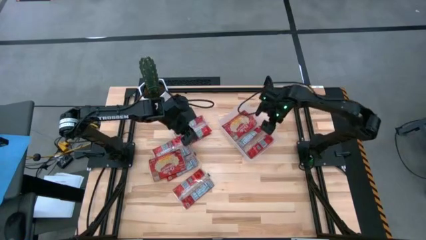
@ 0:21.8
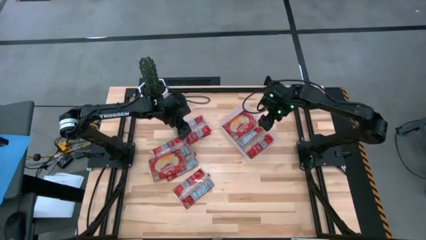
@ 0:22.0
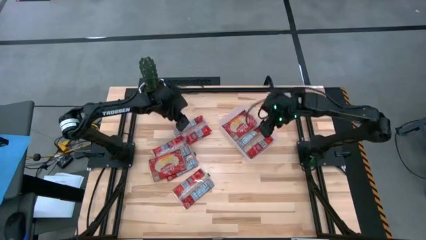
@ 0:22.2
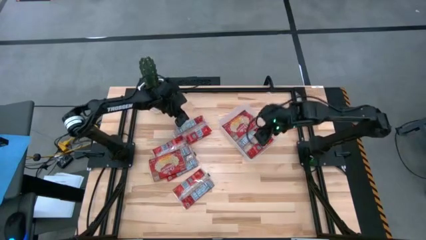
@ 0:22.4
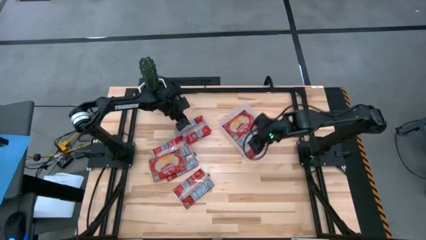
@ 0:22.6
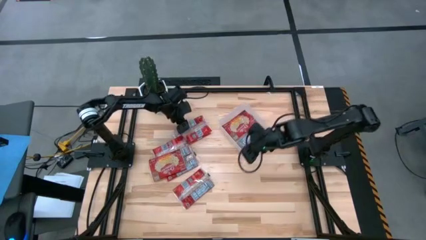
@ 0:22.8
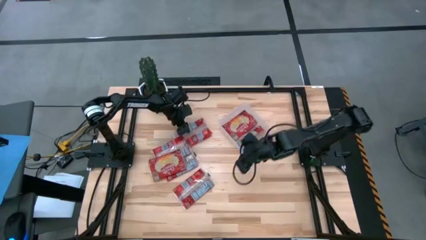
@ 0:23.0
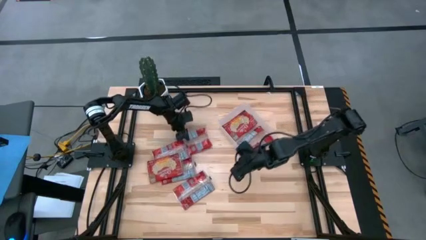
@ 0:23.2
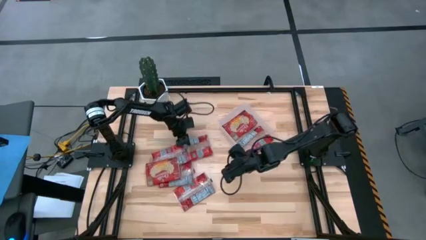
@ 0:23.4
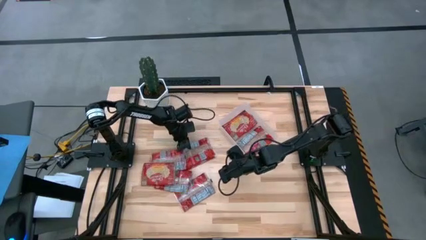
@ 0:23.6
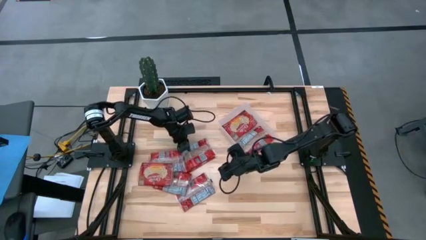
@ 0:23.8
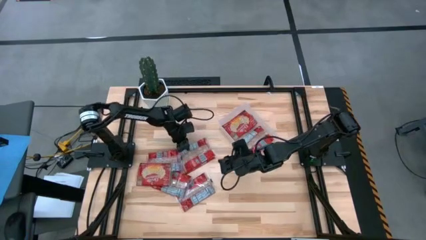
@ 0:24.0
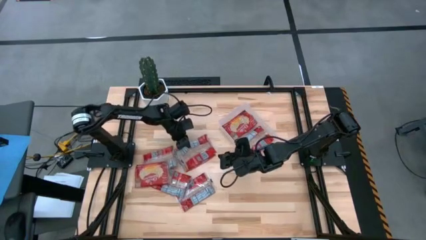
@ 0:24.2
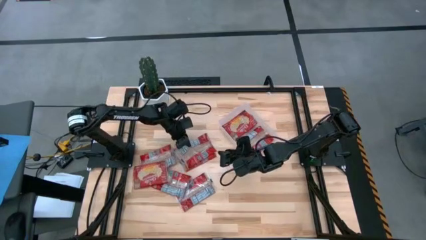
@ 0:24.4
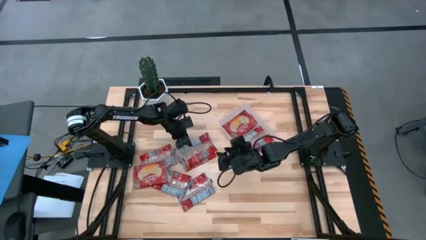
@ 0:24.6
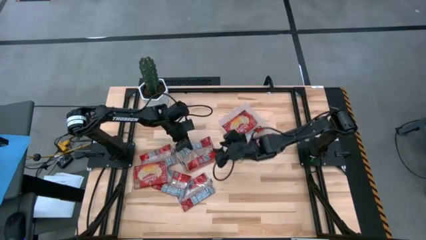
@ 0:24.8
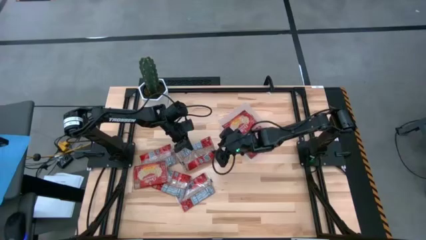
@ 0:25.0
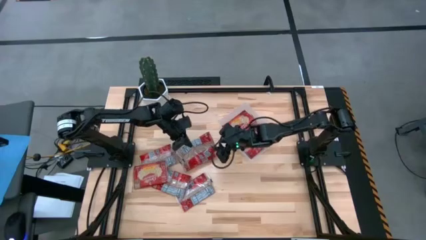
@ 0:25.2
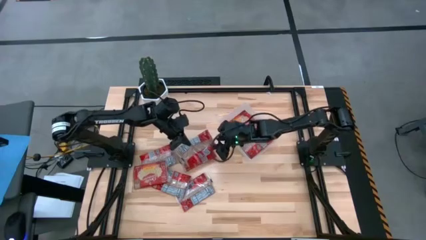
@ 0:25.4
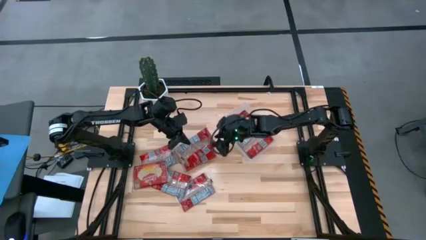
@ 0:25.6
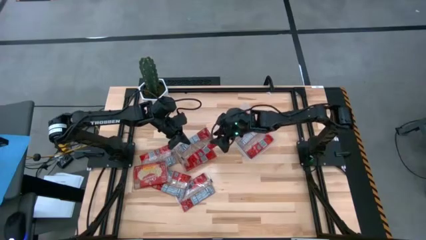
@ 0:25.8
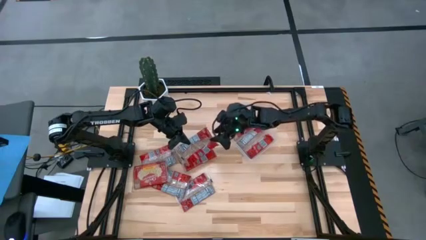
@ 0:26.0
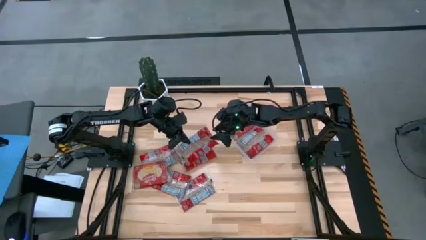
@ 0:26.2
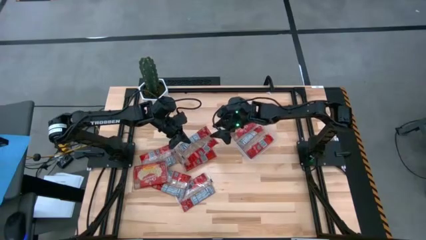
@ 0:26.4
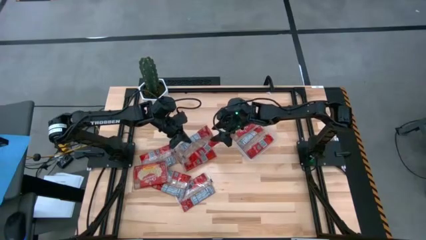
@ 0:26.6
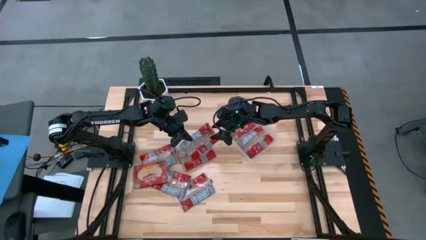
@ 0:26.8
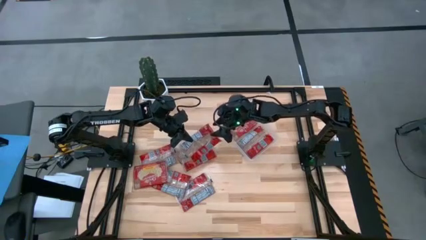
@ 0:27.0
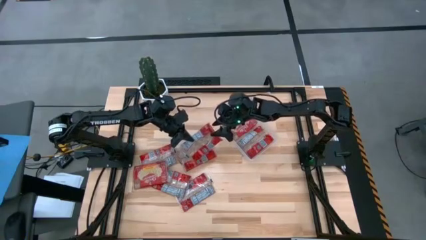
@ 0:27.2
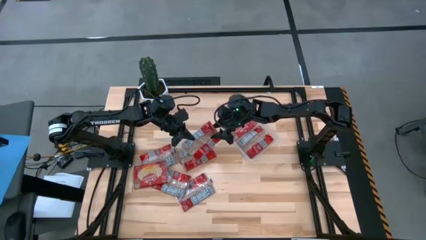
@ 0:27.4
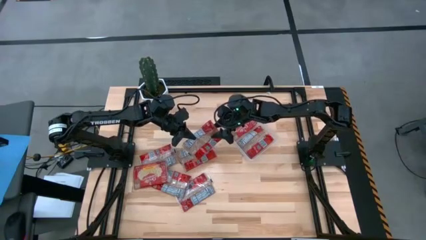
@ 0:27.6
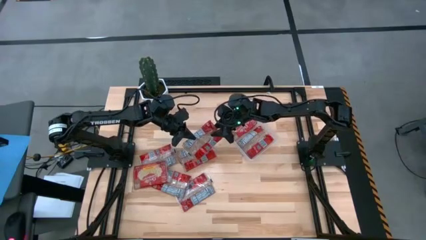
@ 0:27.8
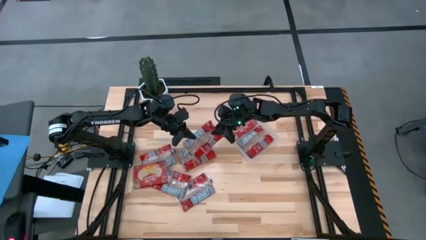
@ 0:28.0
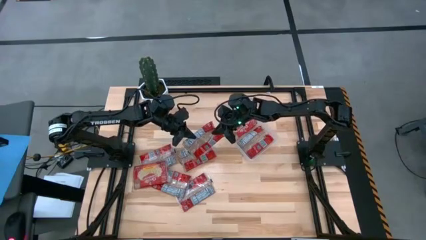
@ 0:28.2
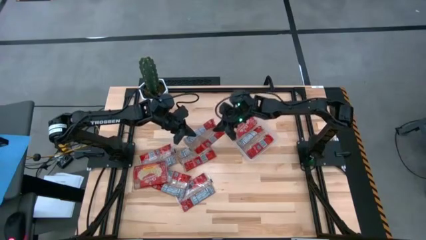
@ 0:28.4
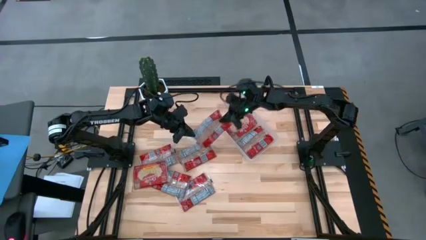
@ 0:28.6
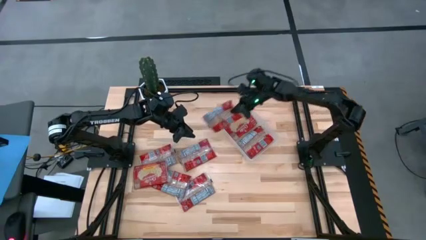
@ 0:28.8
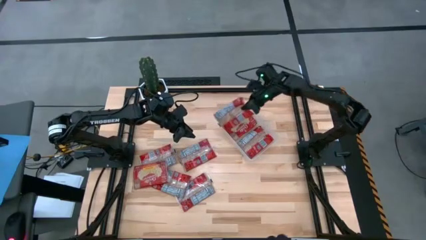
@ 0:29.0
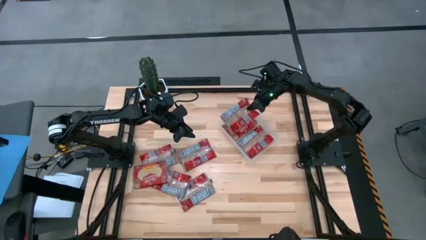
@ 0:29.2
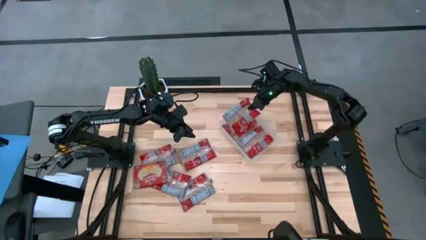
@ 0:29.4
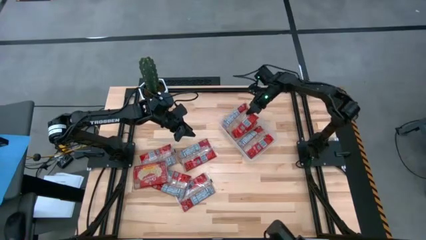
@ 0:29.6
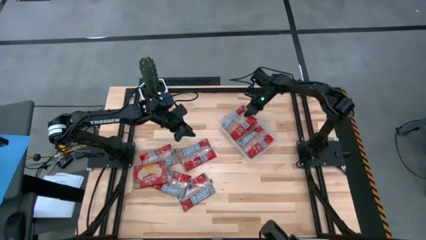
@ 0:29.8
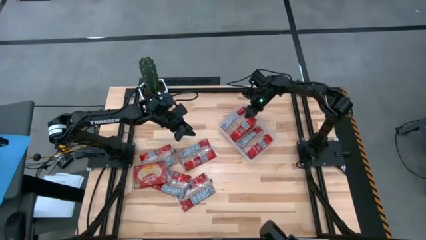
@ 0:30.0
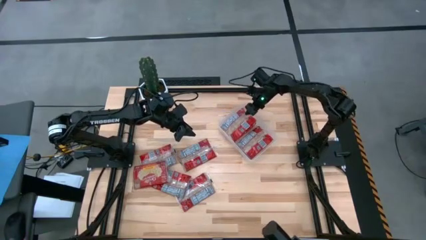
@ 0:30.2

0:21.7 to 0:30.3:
Task: Sort popcorn bags into baskets
Put the red popcorn bag into the transparent bin

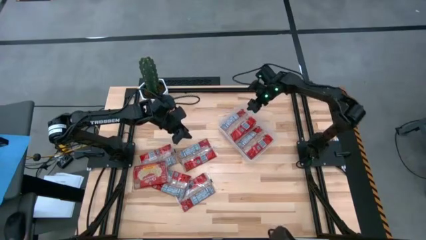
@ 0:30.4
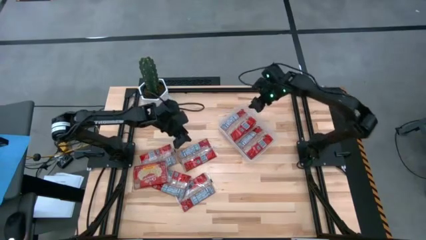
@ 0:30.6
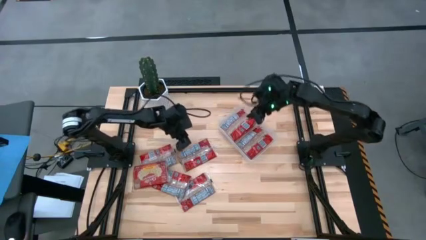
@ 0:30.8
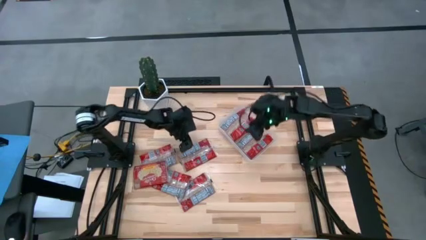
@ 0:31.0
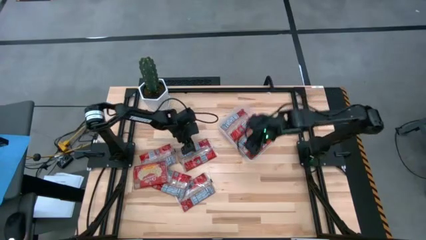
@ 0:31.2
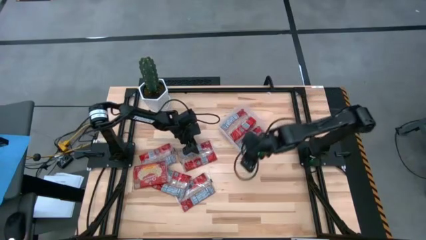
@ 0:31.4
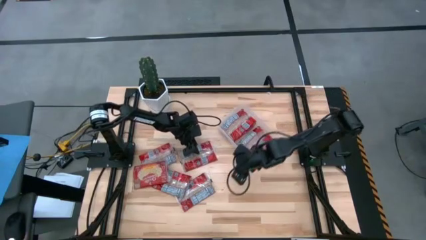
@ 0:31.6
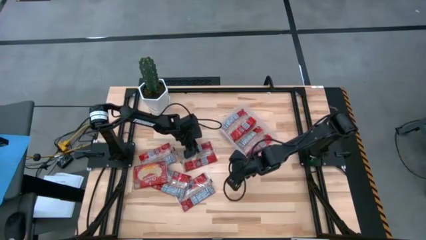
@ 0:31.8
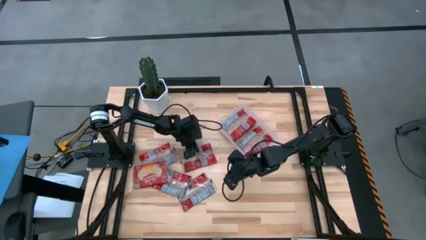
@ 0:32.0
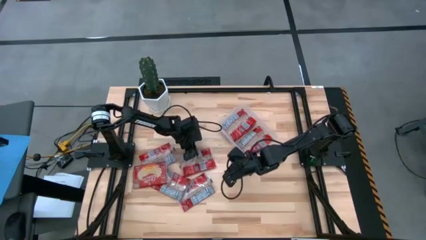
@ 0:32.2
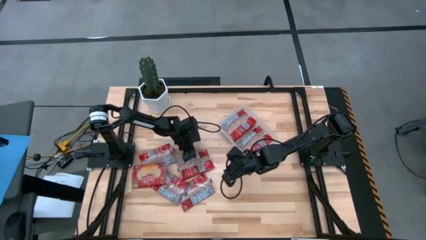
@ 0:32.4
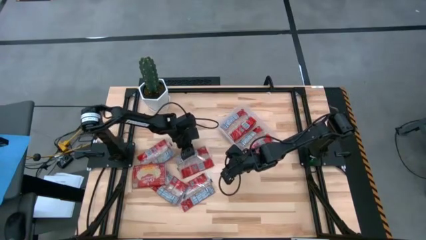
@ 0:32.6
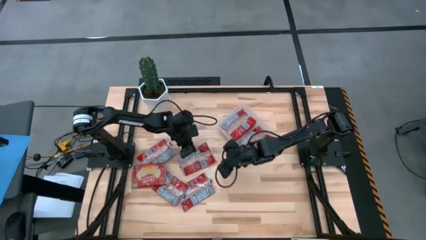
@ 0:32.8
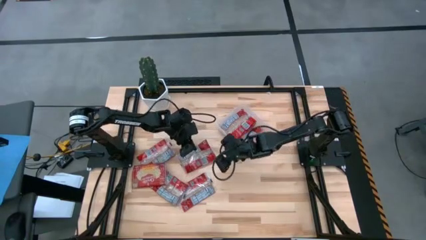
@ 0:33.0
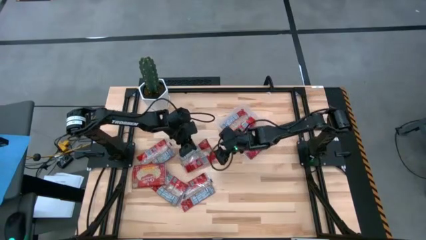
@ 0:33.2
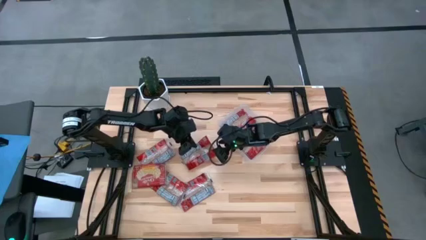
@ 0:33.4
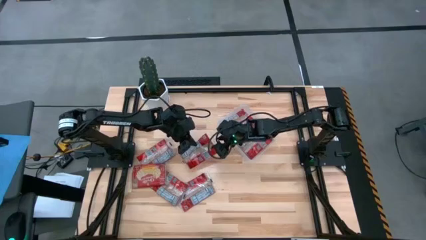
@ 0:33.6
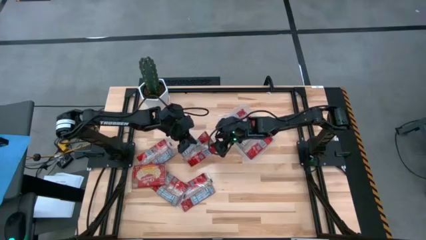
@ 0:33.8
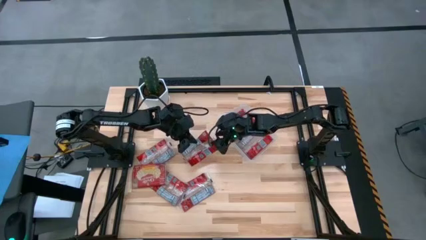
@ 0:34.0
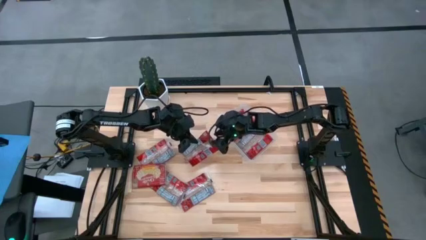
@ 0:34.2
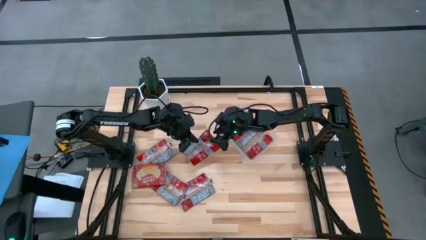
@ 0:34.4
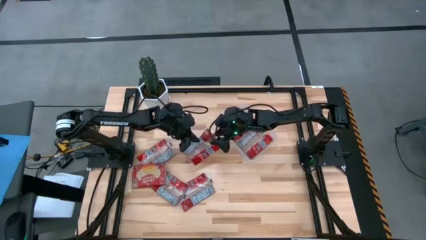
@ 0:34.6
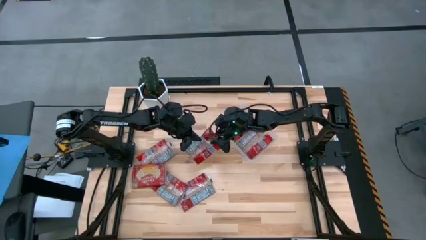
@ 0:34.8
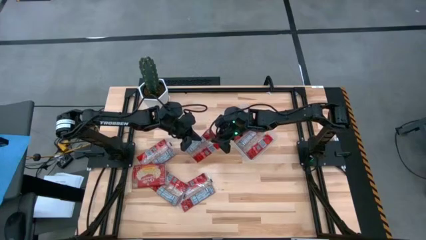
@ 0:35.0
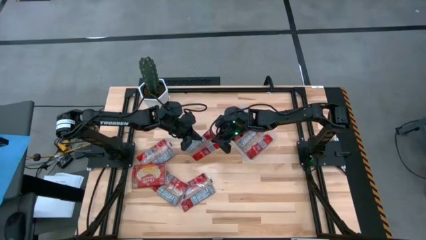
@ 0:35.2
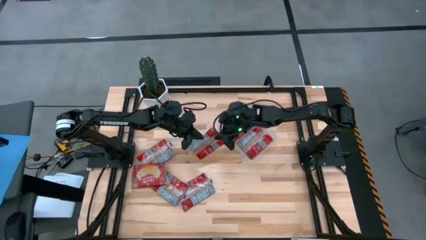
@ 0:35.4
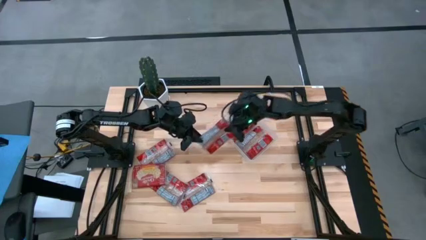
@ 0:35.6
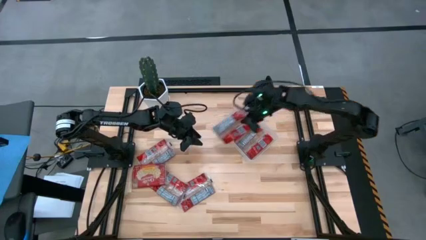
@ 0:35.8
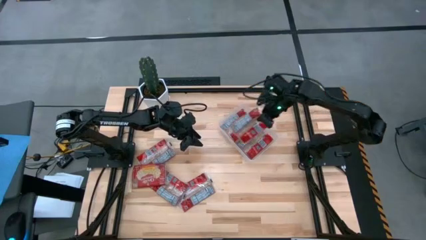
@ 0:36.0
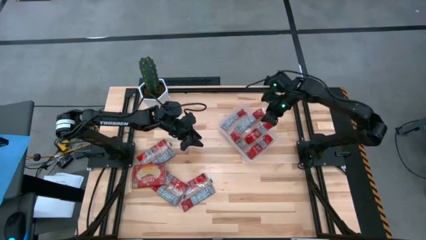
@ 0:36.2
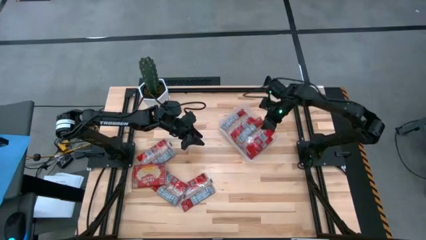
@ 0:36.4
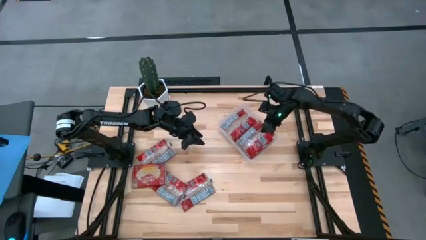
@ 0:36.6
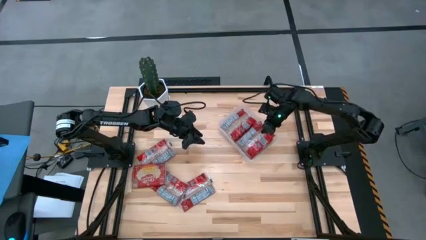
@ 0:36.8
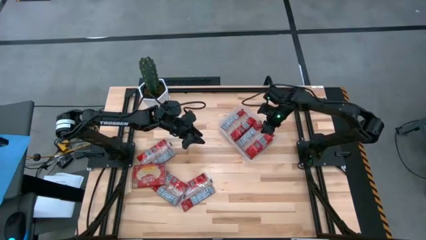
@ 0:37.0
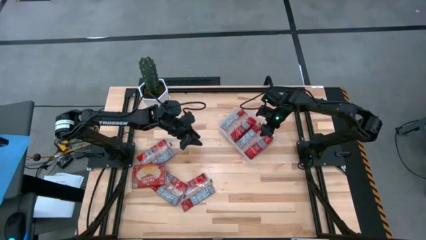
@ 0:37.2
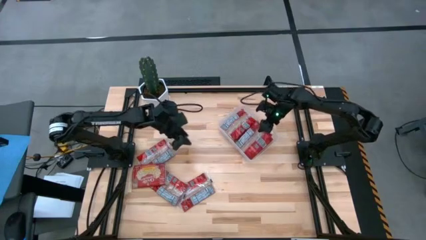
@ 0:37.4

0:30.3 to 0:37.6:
Put the red popcorn bag into the transparent bin
